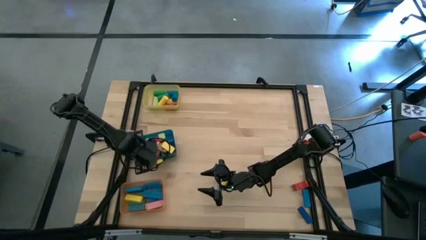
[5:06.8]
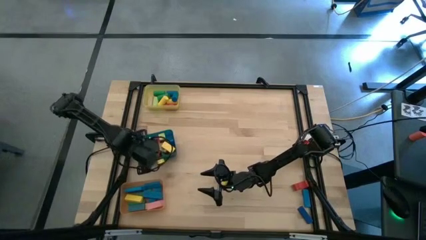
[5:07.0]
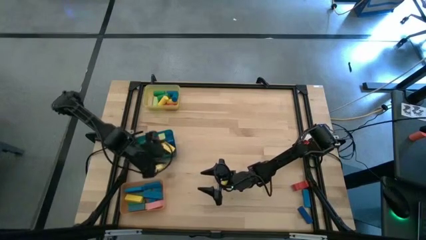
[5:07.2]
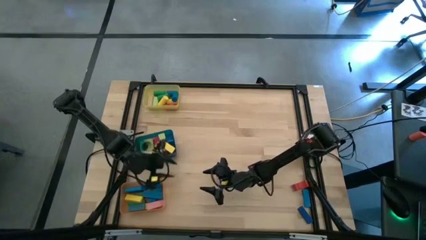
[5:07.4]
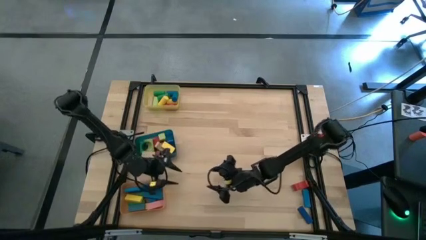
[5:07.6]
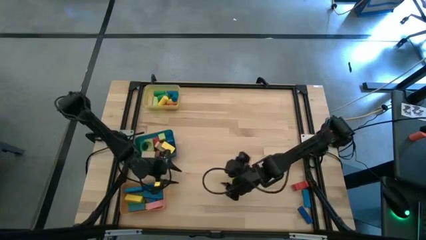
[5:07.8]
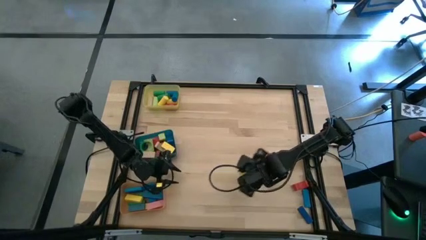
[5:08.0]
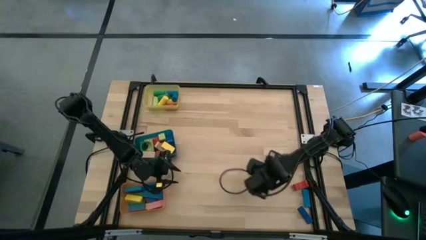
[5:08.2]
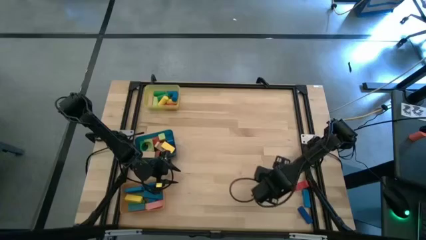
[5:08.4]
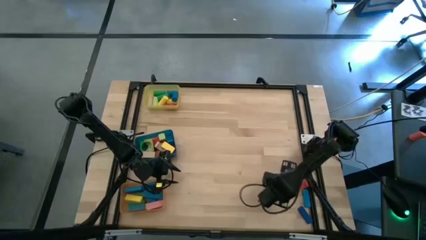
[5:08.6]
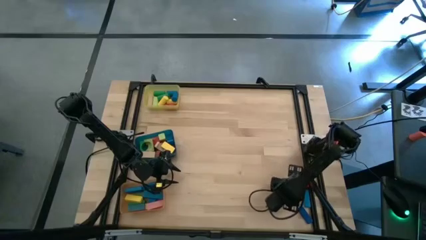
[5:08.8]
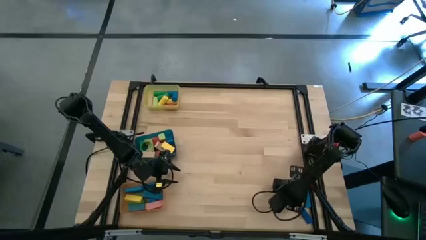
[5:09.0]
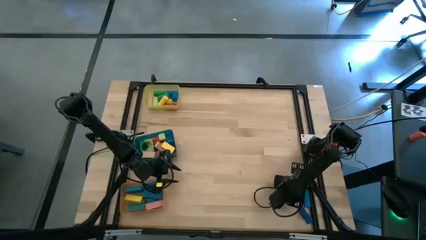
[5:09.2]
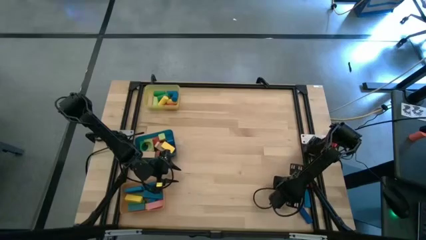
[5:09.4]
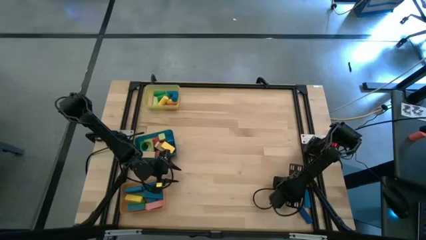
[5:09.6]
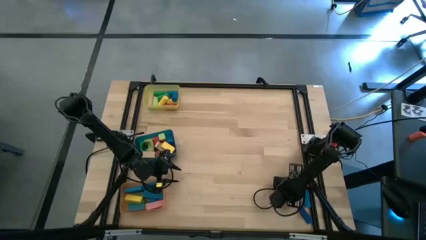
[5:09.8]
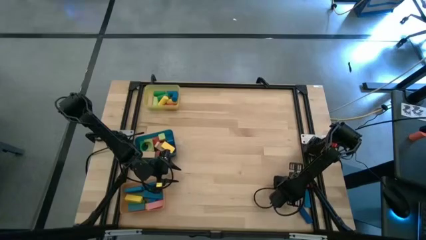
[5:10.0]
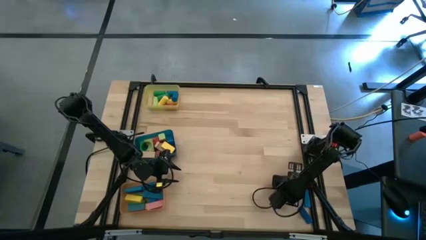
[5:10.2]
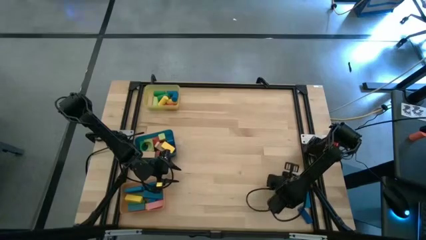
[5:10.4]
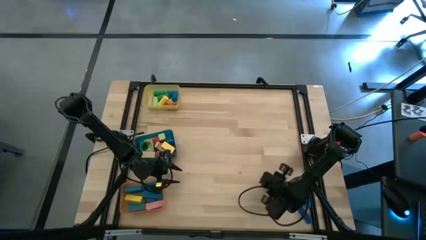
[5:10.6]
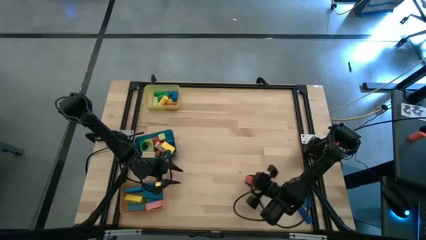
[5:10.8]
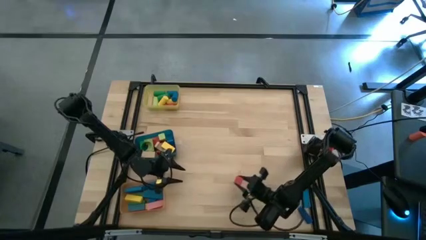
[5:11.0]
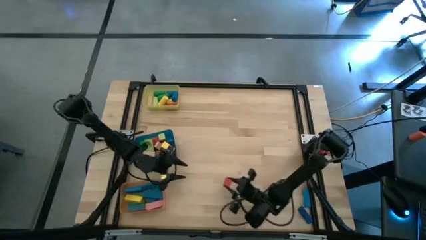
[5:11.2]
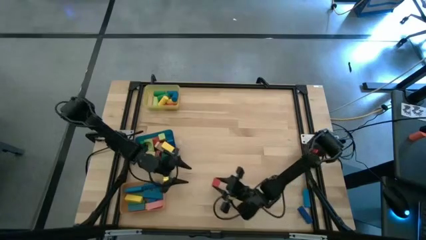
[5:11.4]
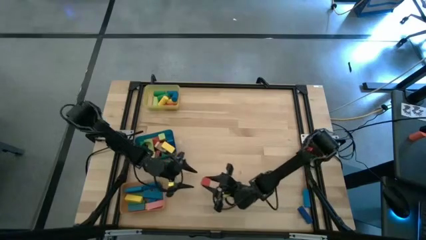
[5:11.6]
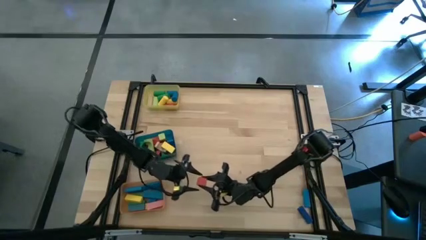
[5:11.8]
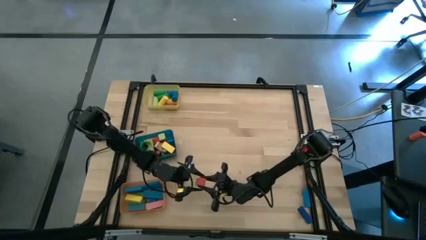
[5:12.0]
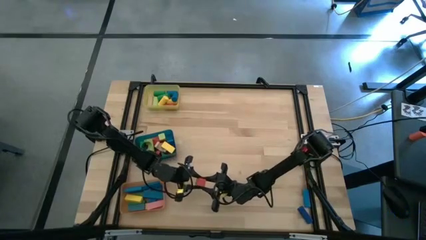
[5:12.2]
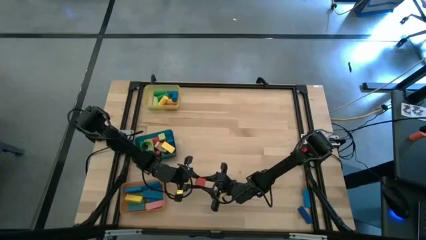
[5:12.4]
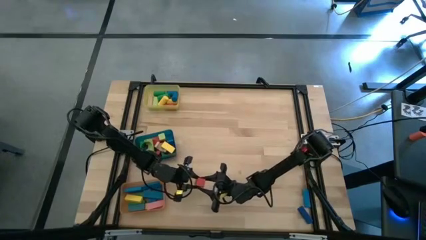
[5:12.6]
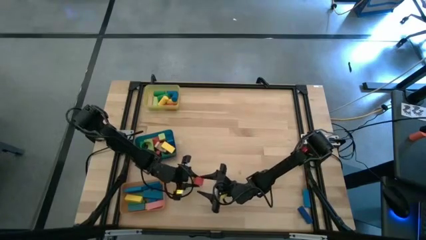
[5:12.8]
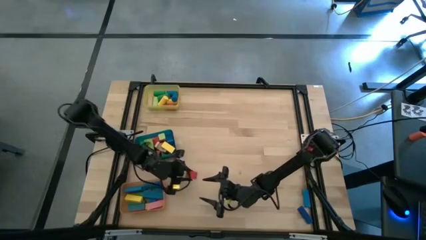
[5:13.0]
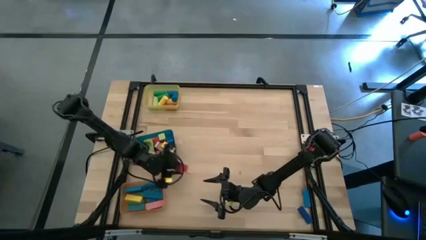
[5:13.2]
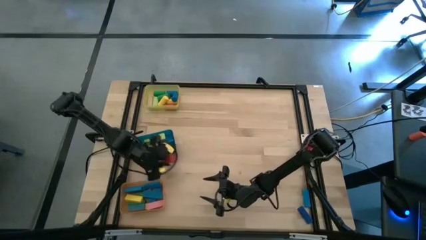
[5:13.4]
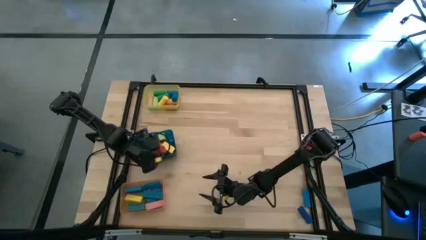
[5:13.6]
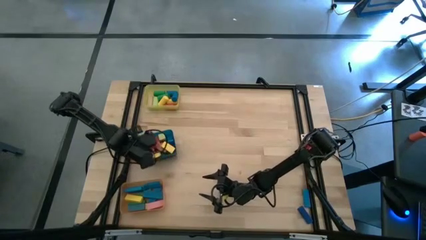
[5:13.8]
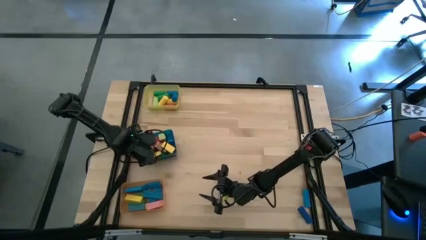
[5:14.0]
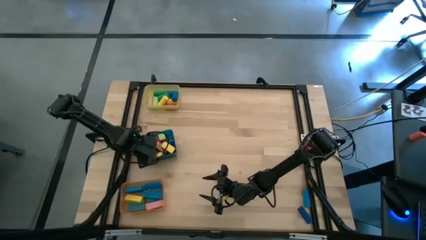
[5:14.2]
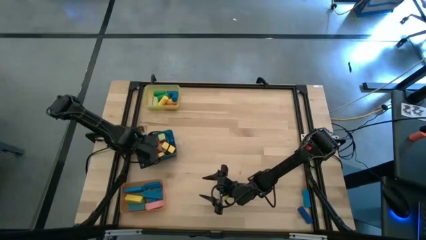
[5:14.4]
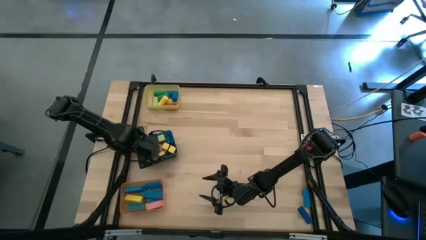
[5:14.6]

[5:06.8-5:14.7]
Task: Sort blocks by size
Put the red arch block into the blue bin

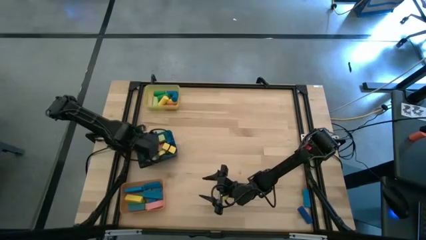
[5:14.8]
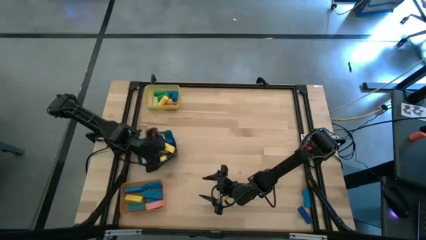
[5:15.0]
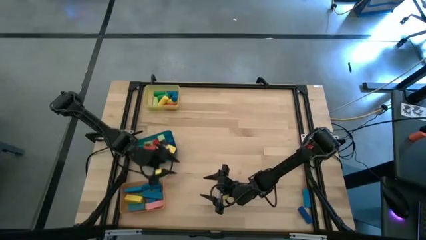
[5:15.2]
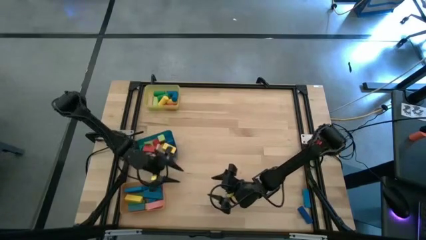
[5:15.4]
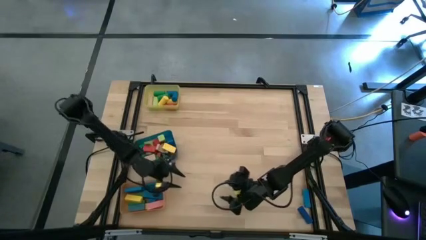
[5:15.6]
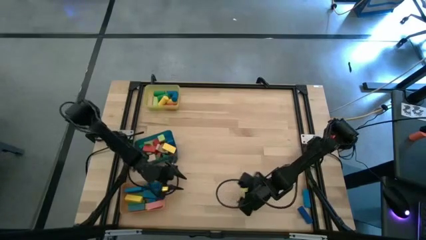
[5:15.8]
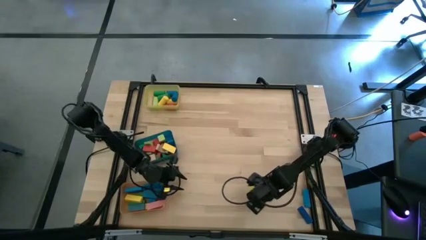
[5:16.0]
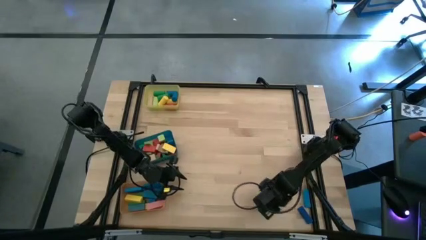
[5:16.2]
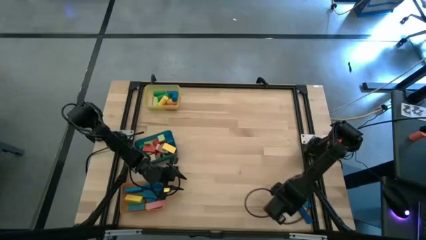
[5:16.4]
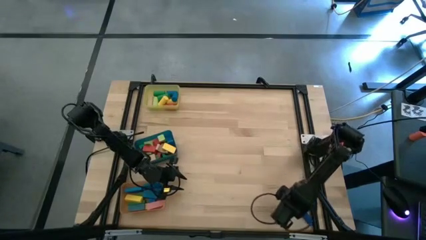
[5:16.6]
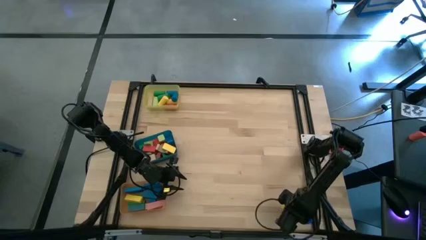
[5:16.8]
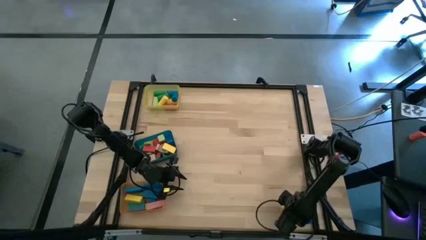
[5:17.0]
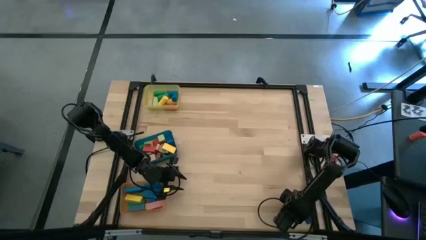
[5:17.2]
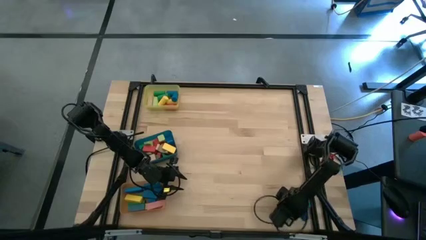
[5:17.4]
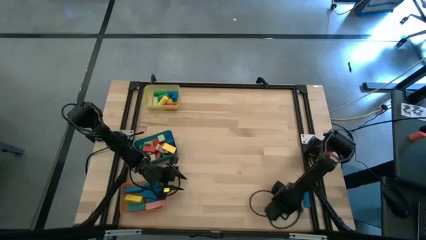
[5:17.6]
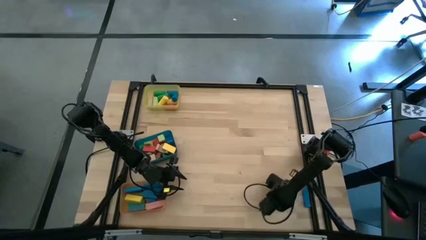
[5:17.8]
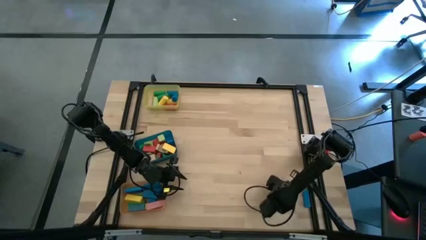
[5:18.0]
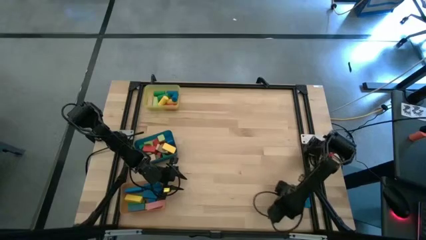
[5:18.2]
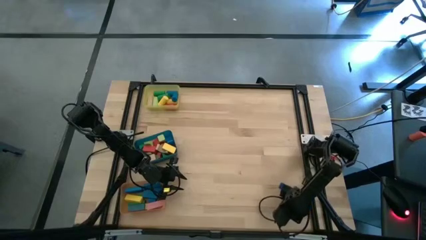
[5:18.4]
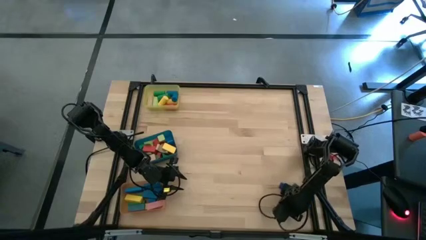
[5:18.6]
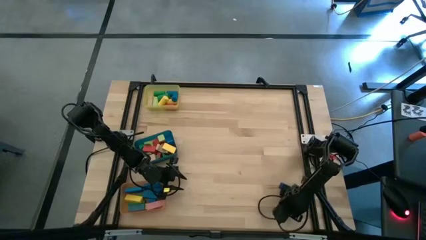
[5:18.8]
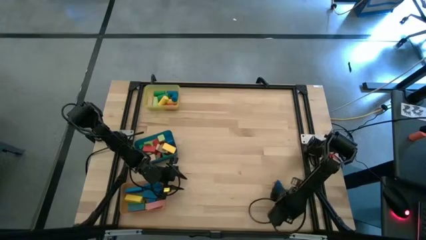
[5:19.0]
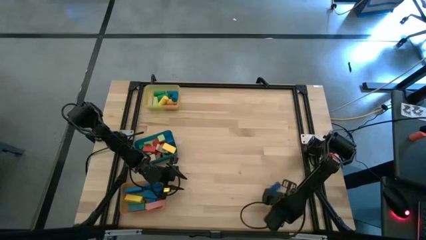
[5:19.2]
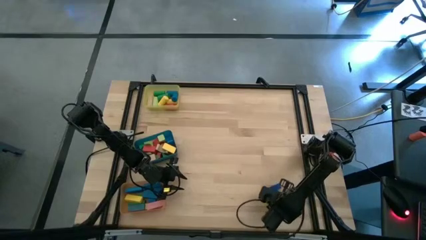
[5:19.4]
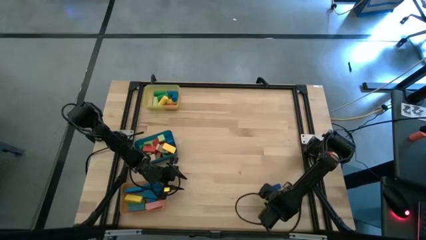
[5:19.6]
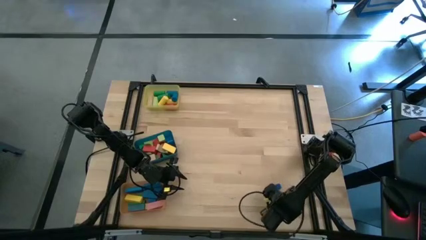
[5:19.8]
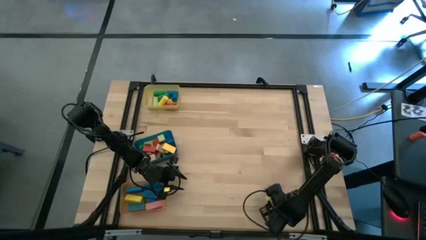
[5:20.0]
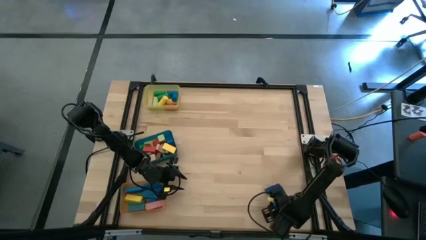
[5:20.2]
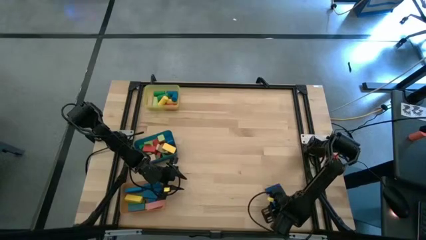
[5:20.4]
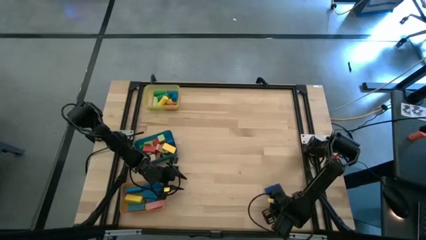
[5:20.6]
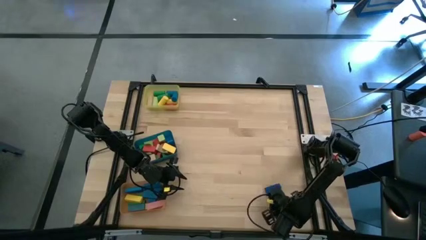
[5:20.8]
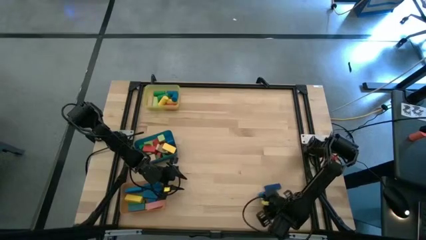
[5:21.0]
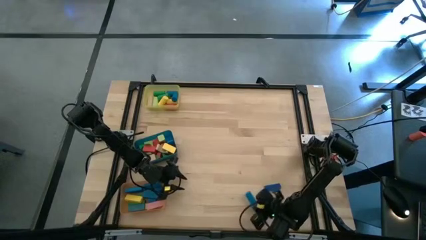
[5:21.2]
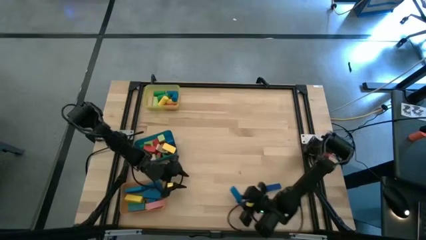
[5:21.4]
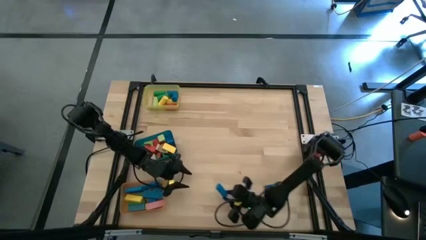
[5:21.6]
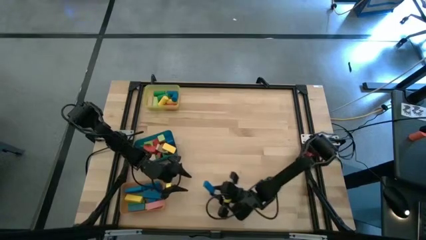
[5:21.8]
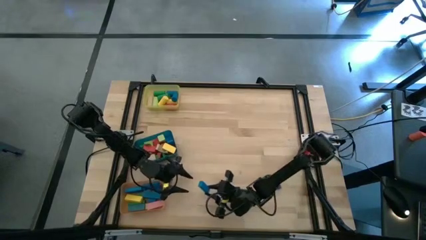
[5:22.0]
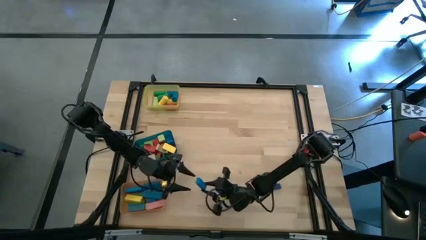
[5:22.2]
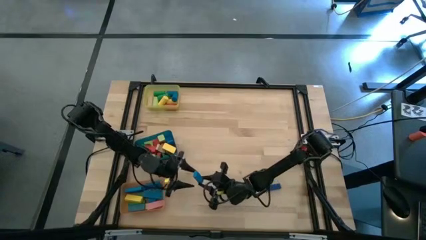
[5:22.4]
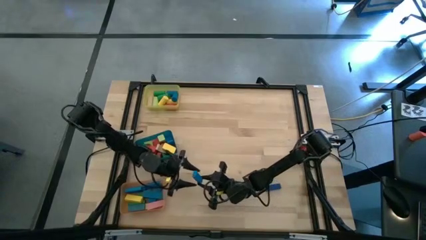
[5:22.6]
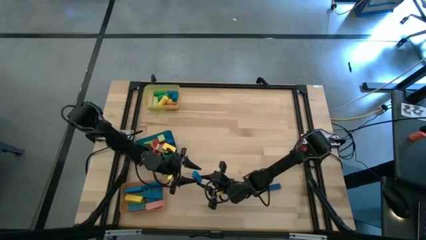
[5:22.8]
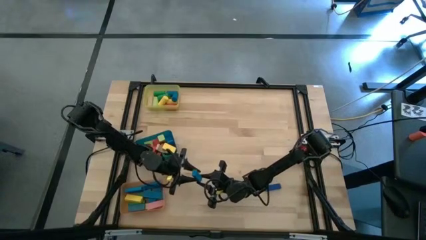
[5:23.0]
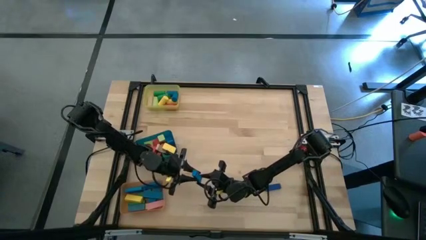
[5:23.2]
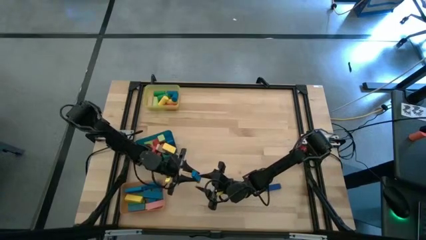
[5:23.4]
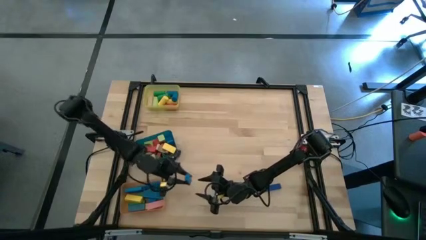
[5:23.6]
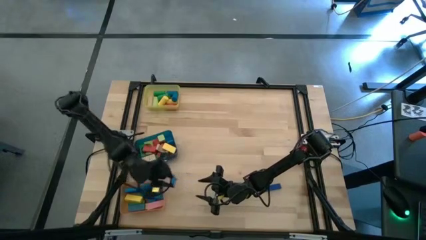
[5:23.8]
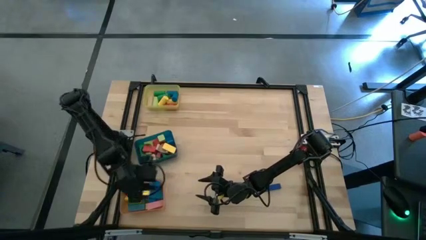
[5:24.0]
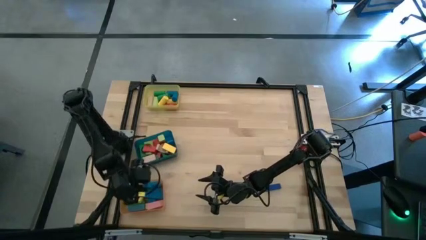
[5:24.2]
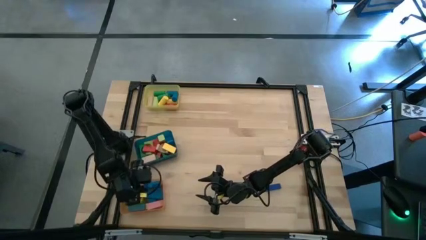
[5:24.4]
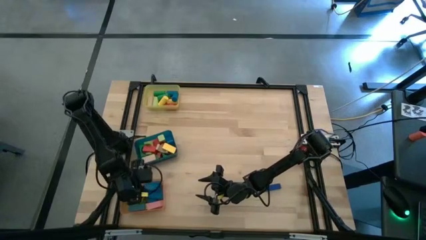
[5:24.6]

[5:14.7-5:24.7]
Put the blue block into the orange bin
